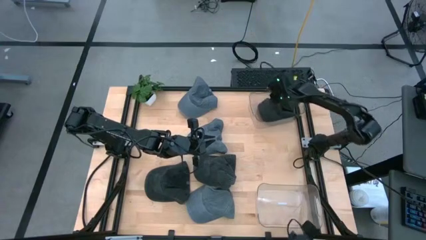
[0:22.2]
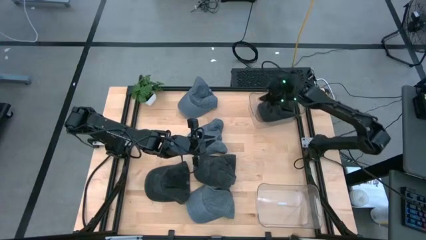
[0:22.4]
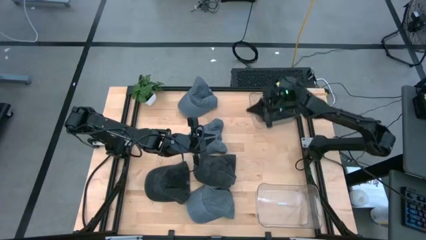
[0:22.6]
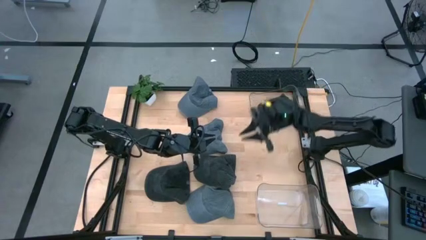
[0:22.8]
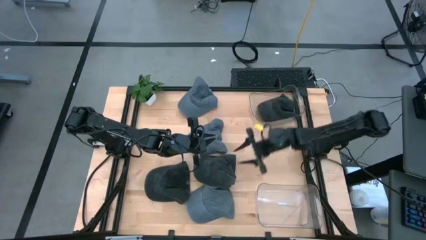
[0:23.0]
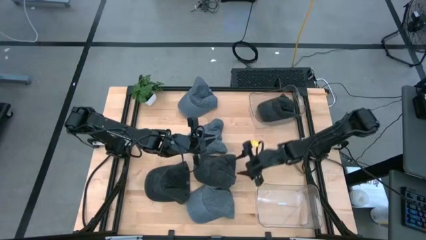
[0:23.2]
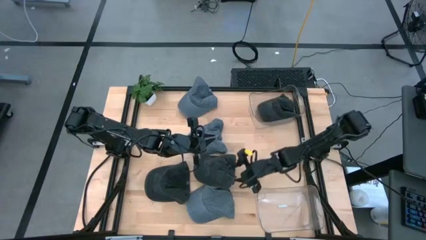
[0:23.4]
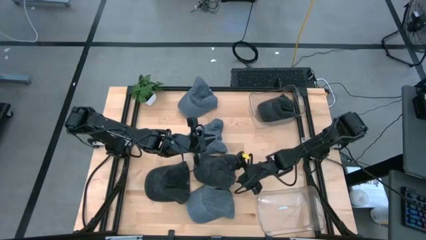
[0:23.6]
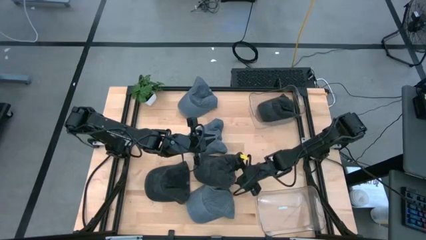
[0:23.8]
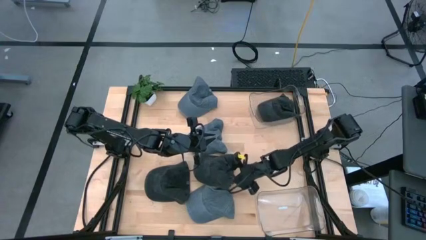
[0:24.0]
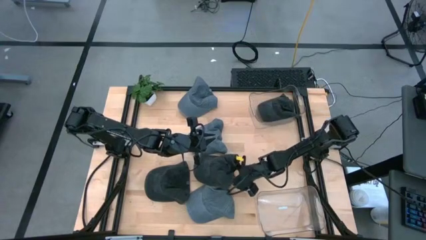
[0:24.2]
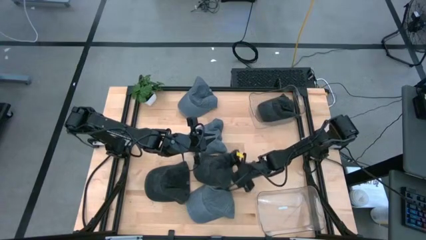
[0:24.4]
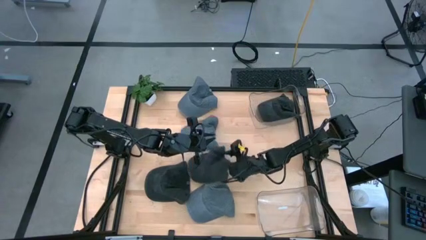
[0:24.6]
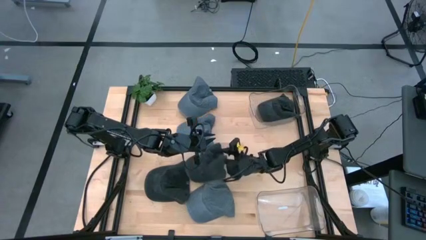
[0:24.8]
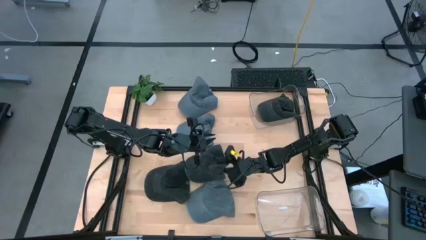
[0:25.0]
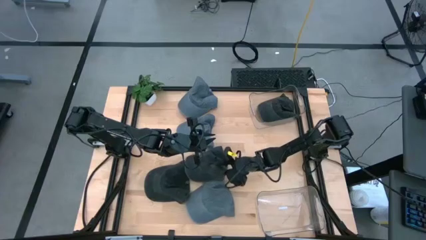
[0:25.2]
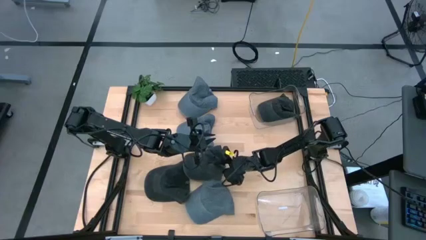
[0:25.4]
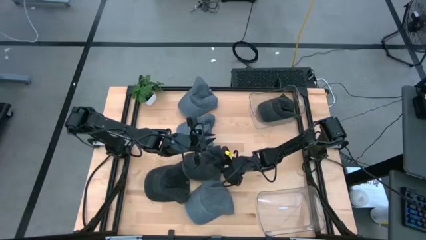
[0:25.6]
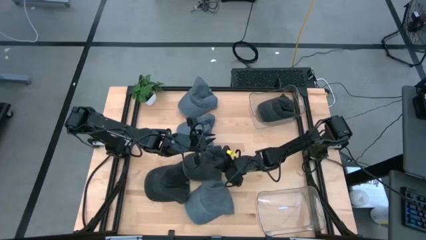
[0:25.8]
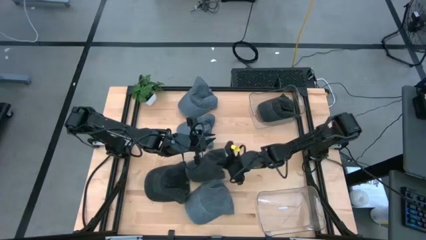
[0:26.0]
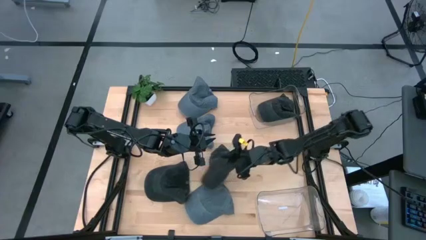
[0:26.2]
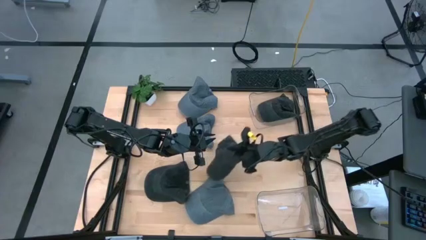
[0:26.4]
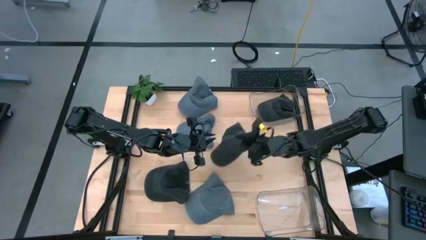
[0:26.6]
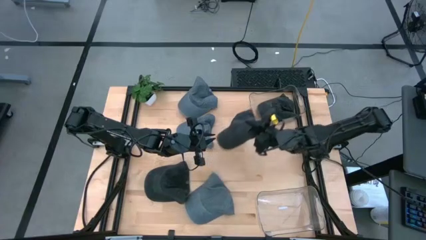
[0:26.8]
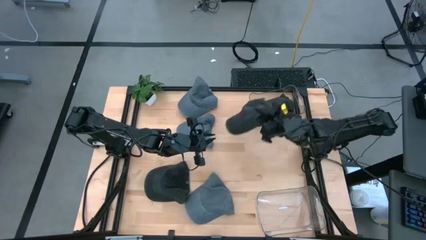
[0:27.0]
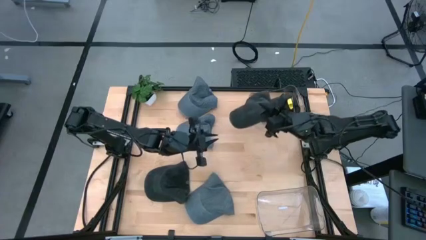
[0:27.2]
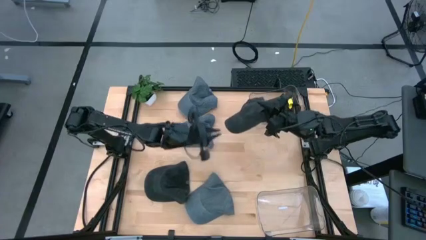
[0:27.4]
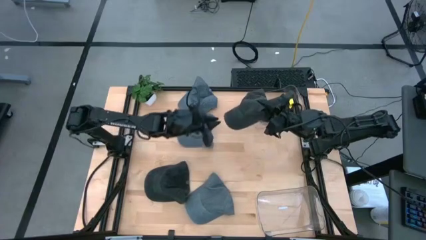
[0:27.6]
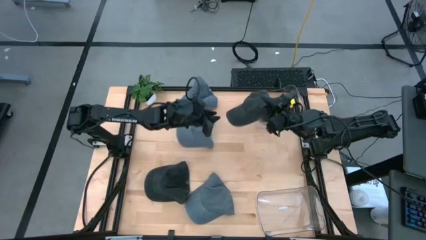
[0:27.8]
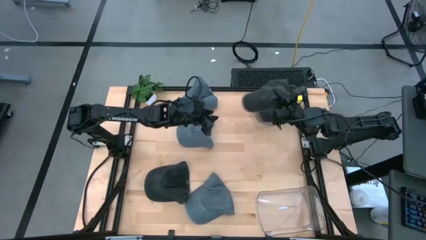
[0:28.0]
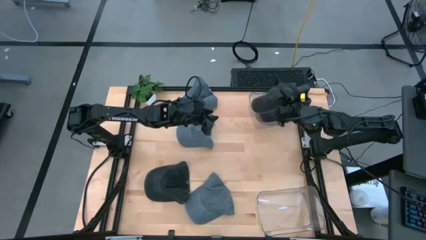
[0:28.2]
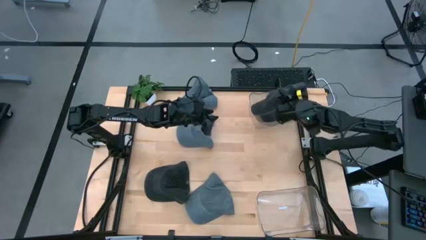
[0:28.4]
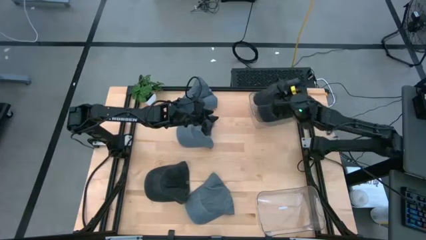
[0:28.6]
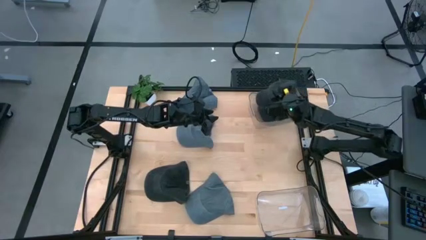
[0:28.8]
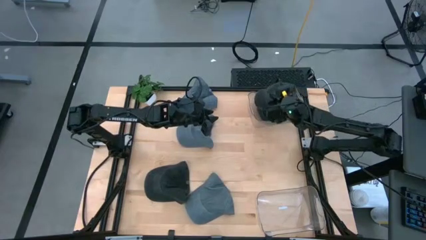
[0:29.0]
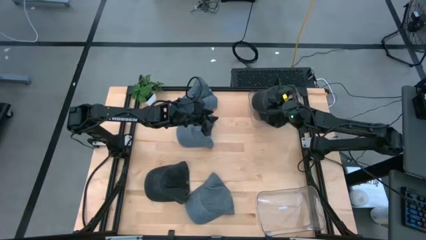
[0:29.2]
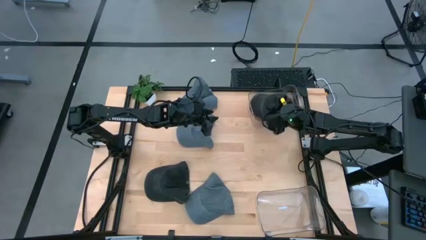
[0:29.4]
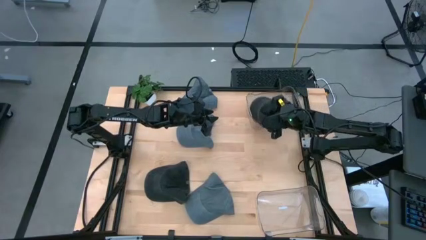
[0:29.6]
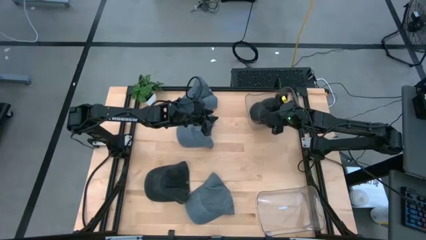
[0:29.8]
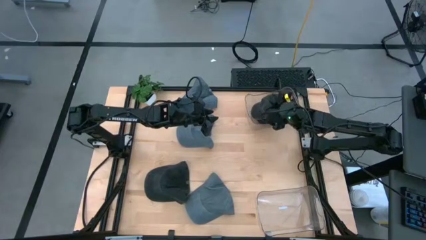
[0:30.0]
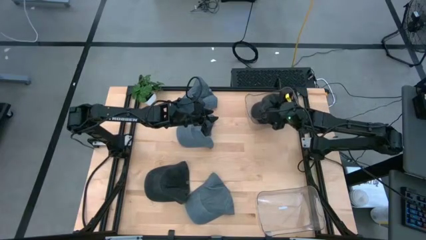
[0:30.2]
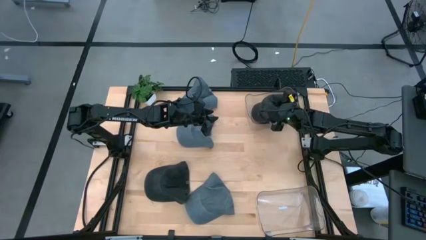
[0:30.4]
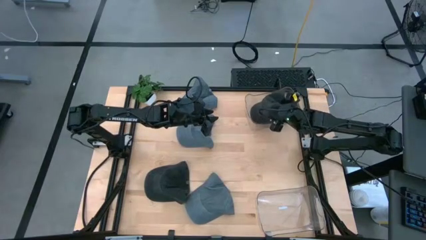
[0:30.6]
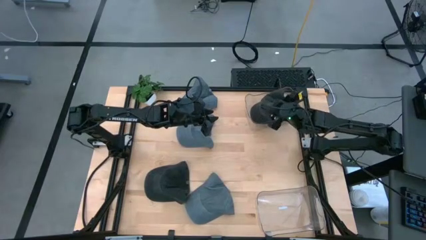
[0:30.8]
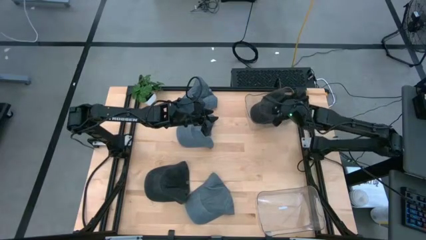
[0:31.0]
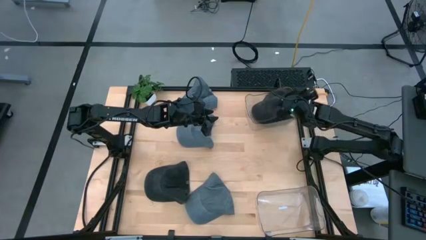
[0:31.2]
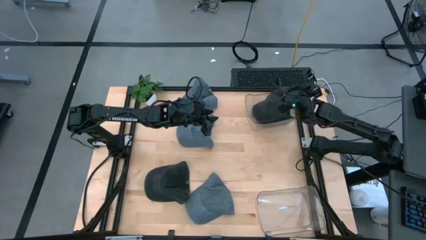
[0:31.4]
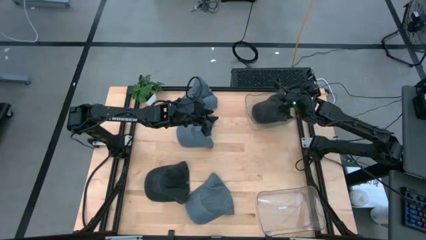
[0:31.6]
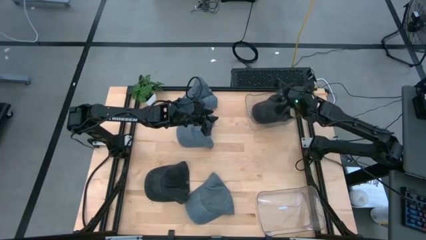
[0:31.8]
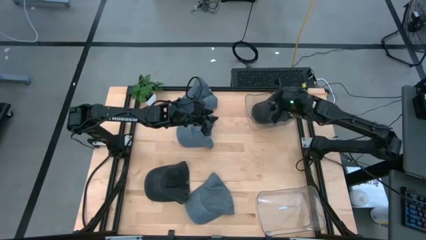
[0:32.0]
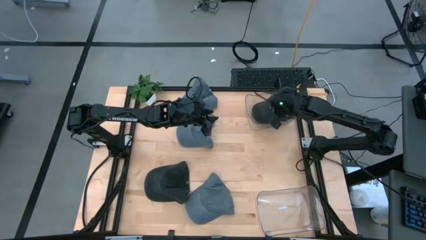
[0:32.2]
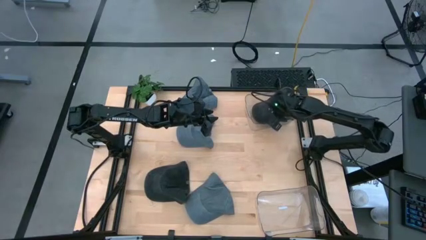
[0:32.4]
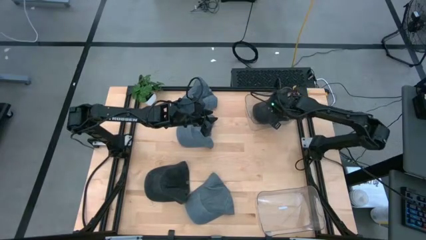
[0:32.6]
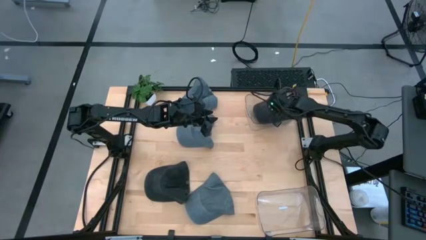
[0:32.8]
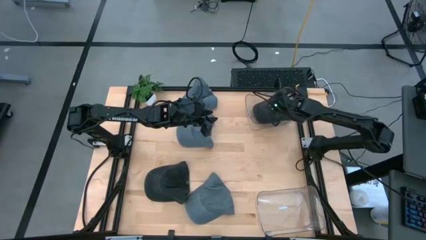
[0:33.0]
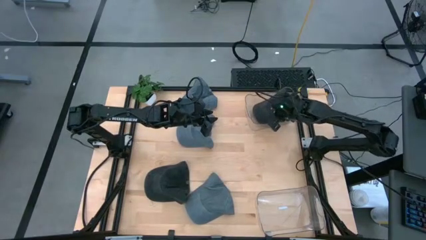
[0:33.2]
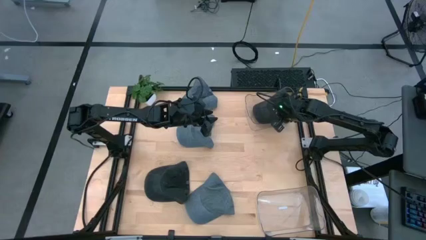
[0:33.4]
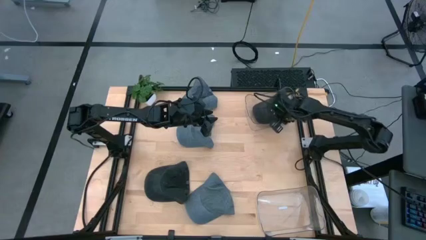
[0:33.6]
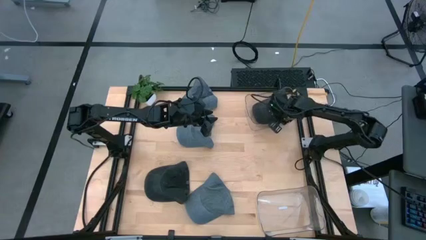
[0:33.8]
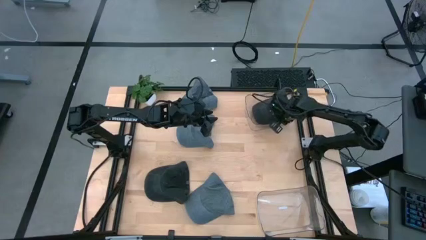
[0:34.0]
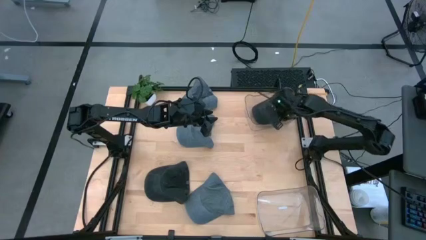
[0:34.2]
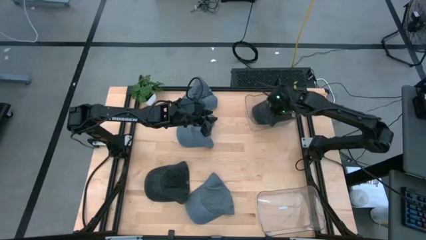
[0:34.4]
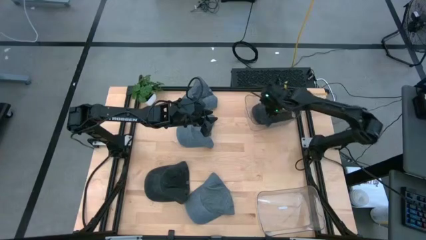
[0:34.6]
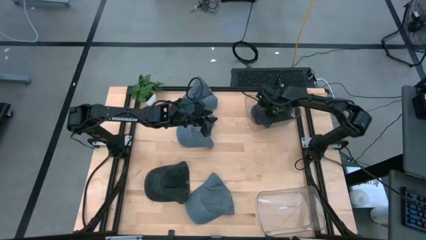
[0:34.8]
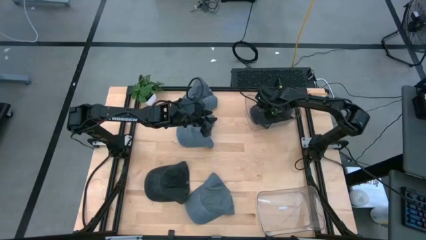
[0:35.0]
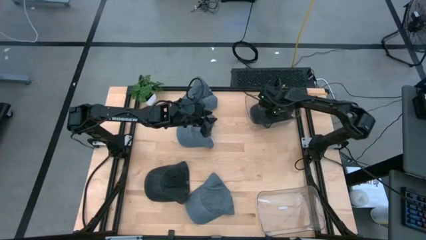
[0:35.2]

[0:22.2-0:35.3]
Task: Pick & Place hat
Put the right black cap into the top transparent bin
